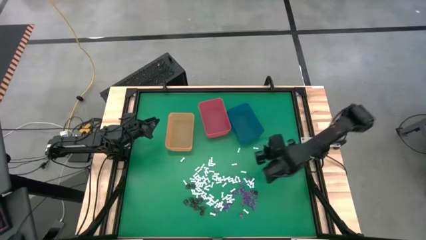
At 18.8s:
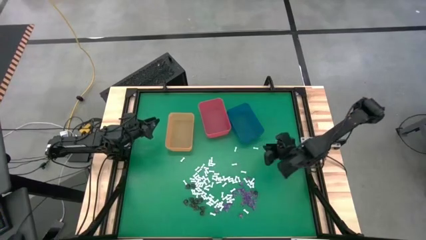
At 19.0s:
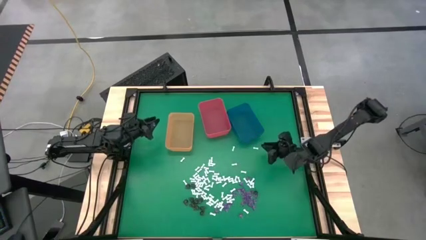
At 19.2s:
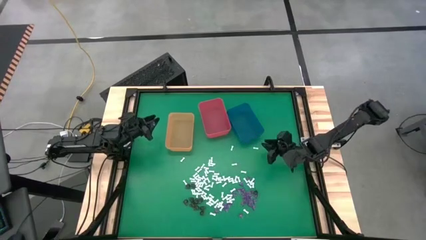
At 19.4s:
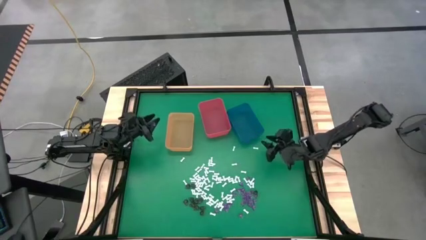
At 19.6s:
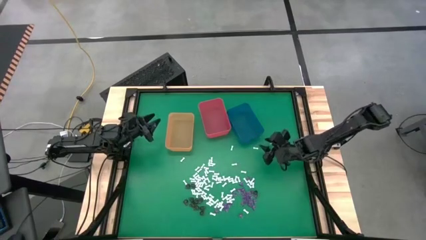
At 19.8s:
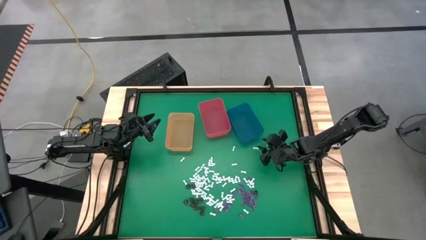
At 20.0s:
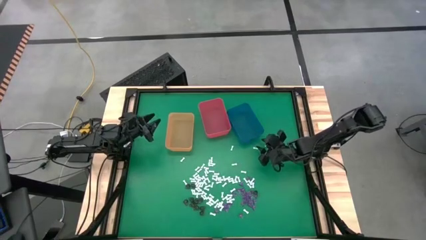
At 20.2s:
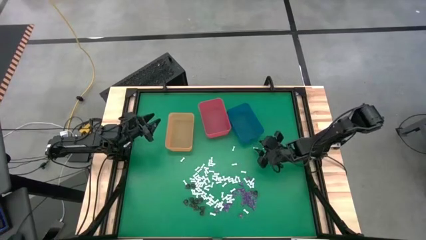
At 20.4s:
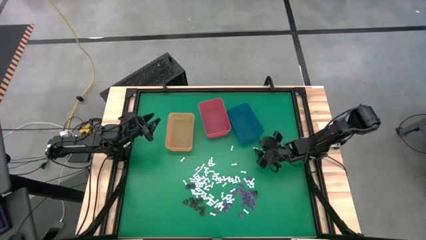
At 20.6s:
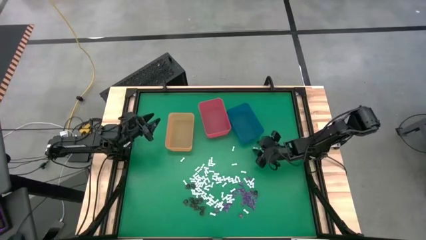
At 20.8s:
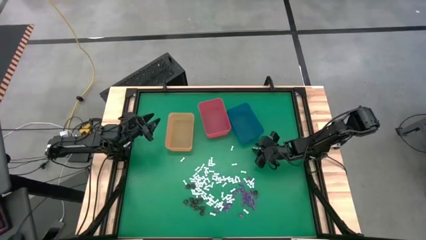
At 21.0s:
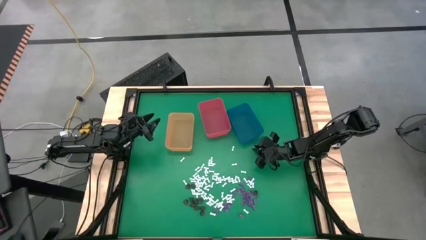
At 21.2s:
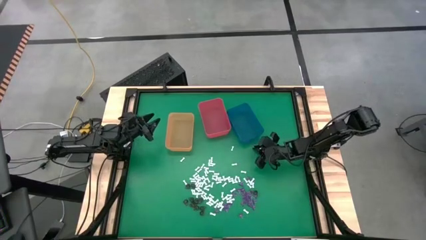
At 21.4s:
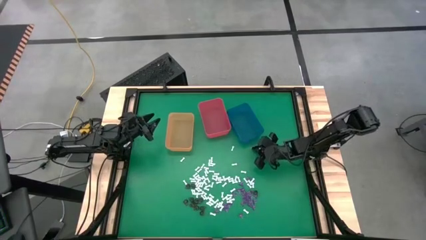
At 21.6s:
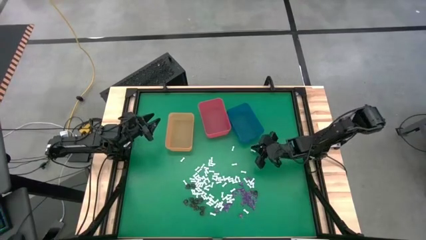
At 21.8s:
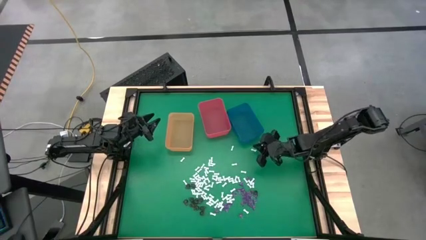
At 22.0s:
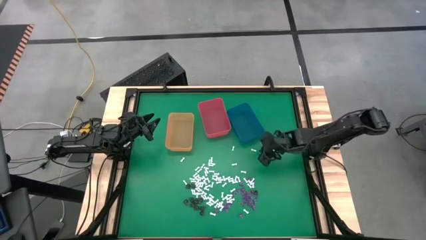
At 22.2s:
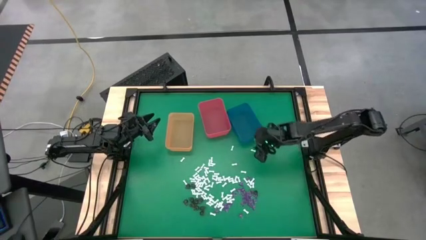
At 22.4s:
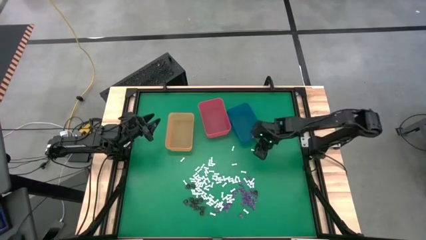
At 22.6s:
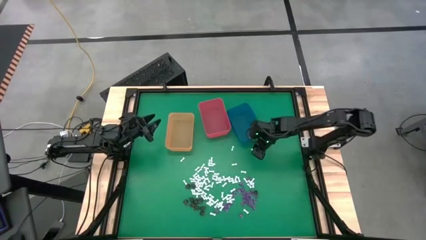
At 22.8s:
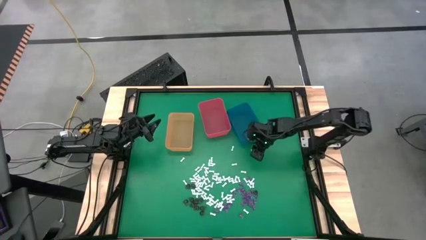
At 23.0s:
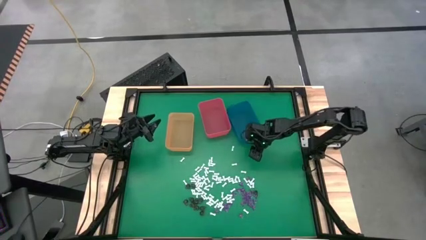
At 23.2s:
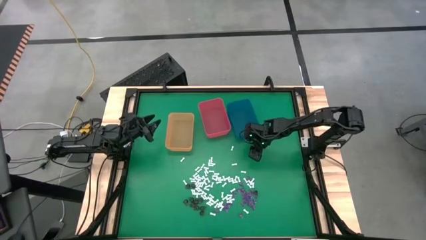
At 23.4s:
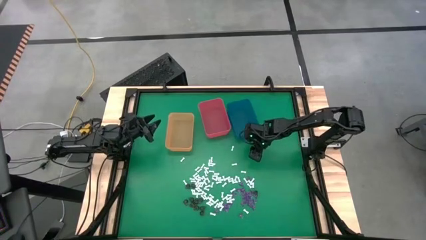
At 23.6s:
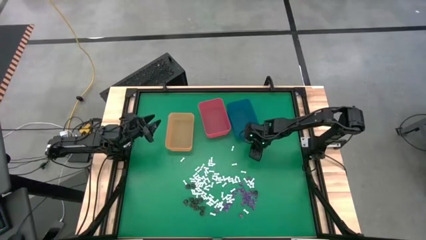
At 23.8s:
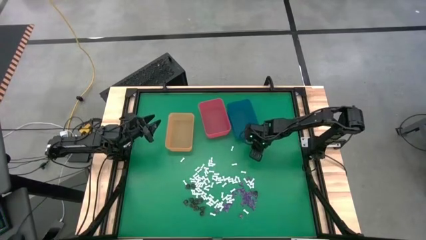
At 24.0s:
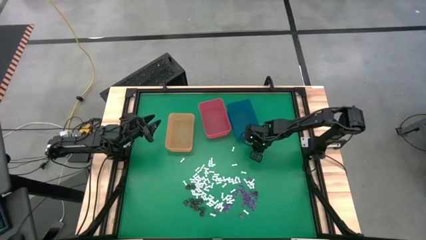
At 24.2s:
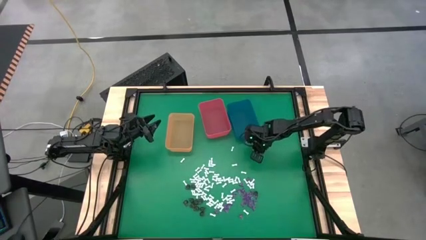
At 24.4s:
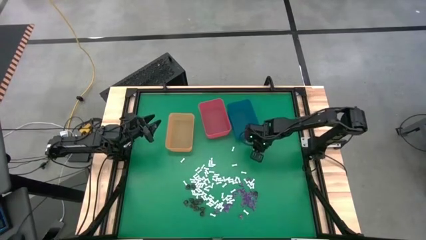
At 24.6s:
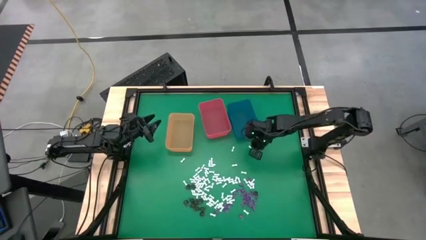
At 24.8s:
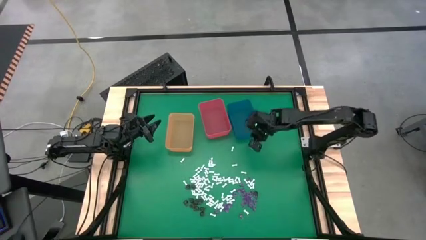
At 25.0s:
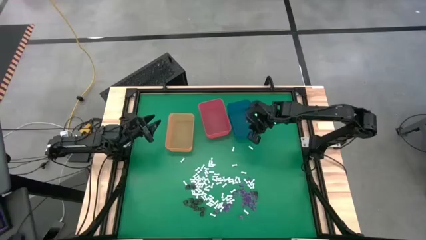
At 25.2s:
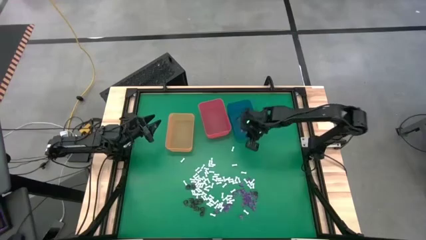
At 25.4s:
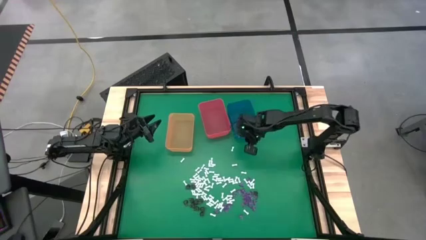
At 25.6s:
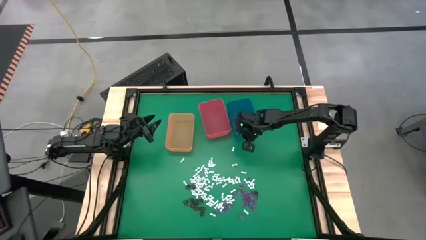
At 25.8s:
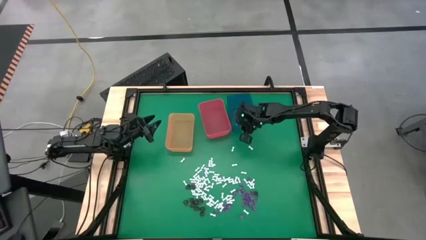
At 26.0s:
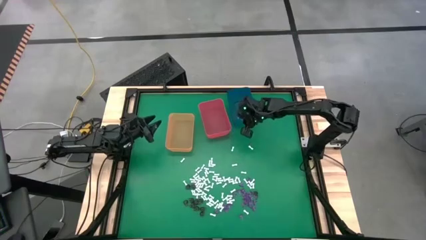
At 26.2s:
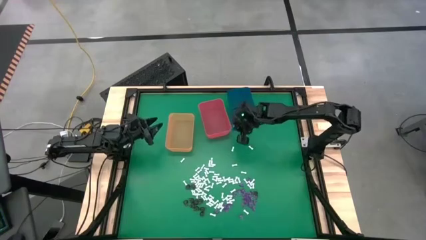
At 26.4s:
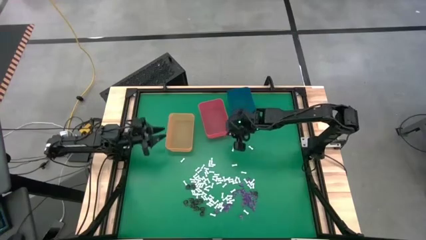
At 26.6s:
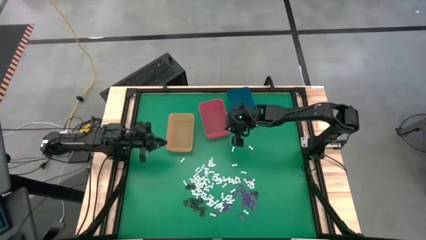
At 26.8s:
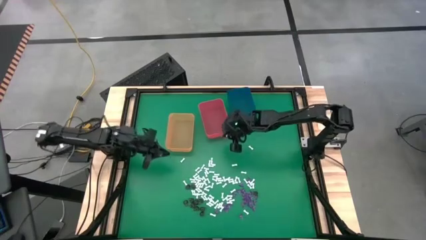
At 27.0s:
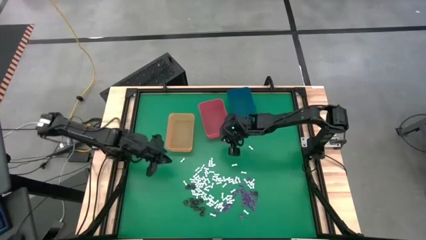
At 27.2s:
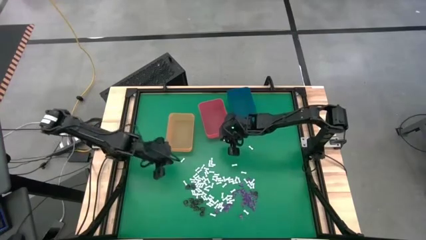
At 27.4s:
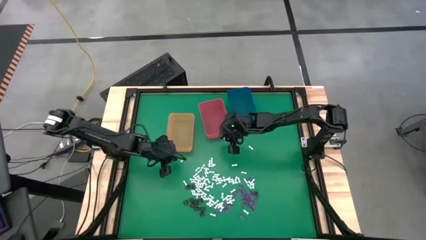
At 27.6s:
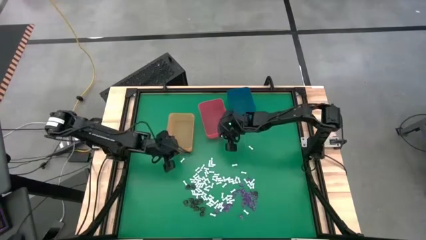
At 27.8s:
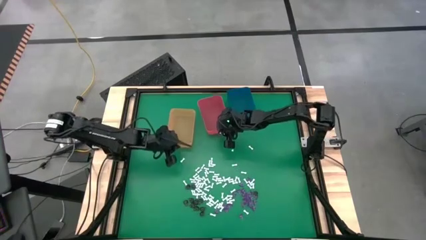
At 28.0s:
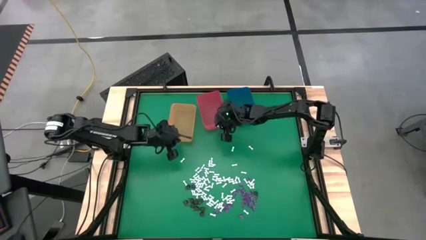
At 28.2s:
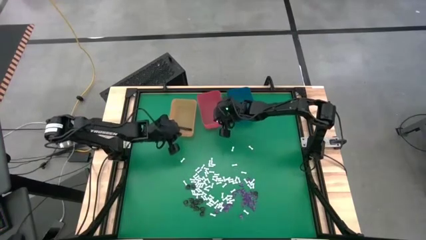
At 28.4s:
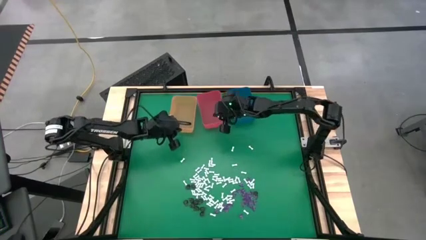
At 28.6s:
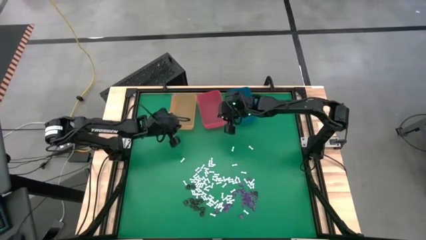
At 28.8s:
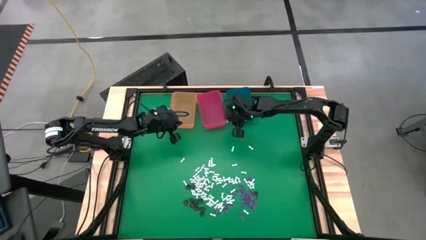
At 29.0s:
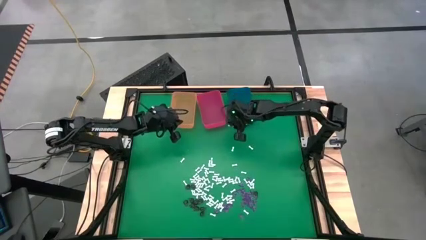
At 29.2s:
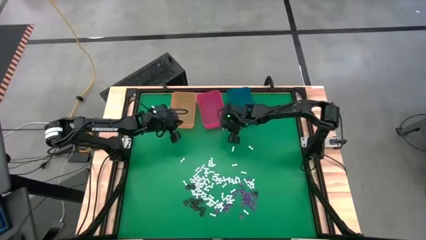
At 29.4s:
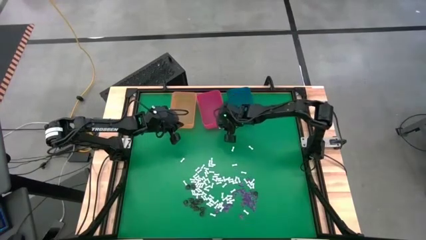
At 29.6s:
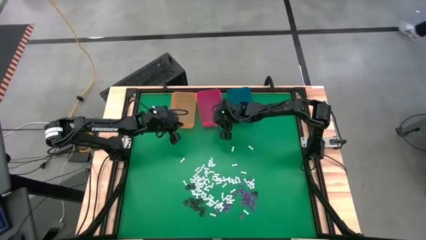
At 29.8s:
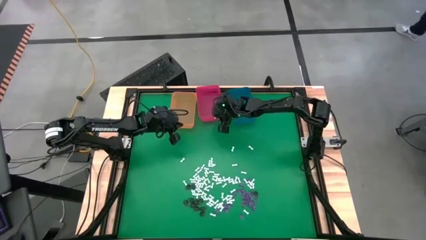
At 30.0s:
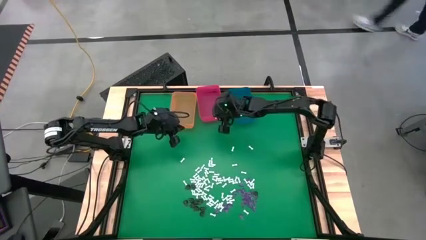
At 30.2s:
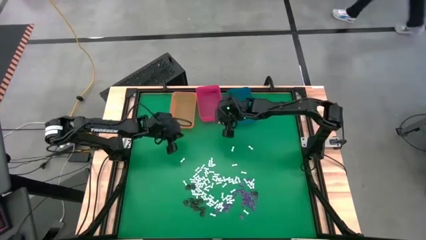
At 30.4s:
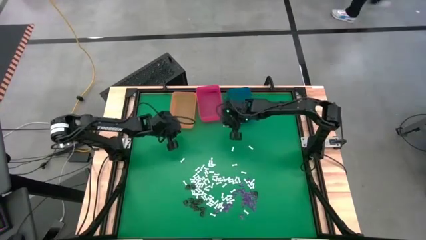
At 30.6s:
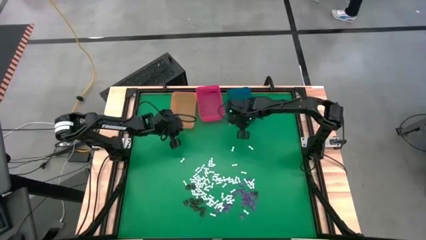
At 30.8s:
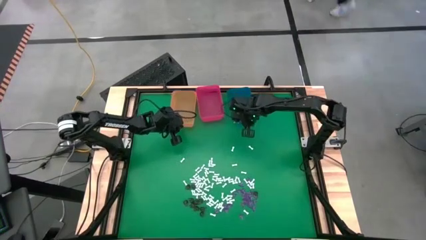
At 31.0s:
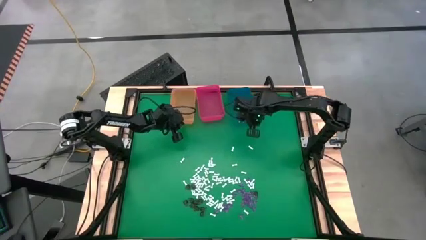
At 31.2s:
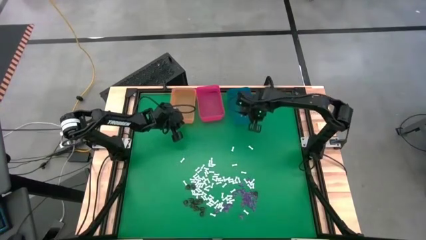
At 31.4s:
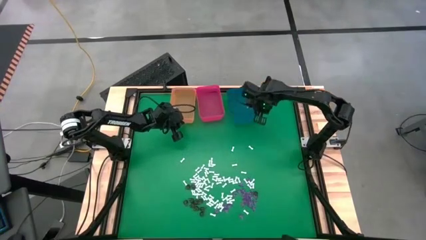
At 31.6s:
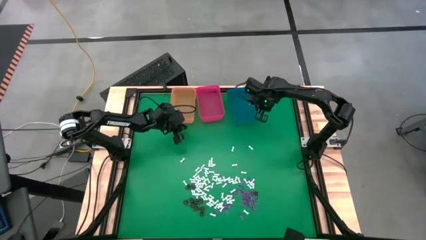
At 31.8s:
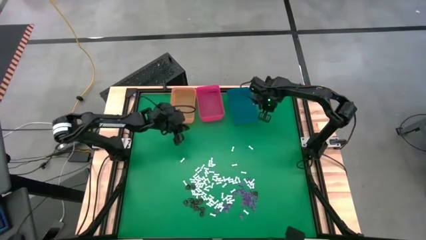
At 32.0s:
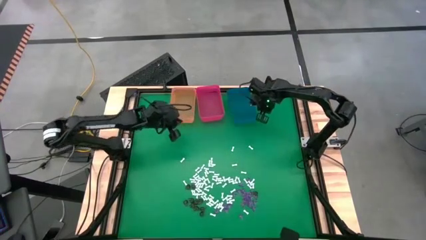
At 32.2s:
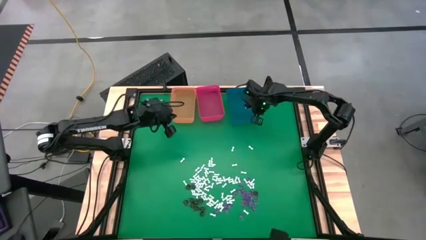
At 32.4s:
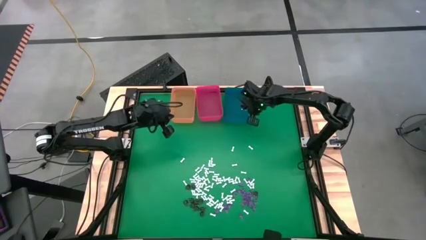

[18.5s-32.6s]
Task: Sort Halloween decoration
Put the white bone toy into the blue bin

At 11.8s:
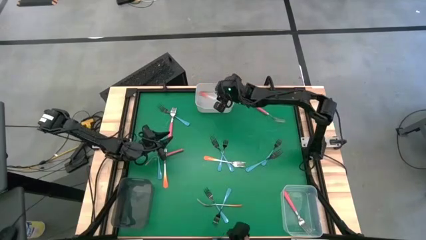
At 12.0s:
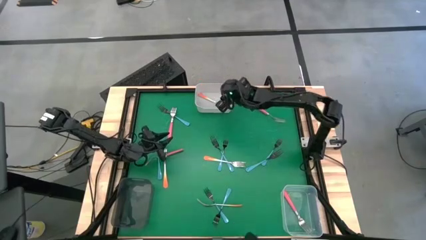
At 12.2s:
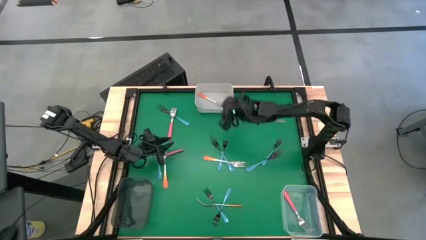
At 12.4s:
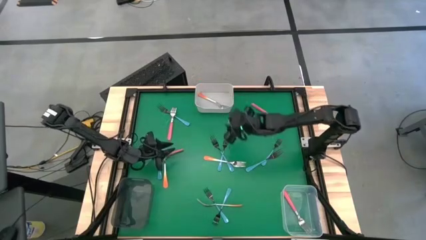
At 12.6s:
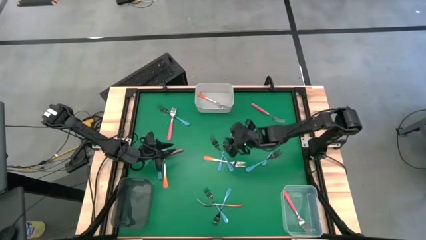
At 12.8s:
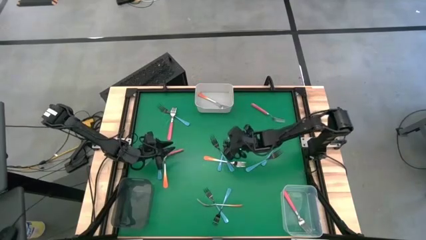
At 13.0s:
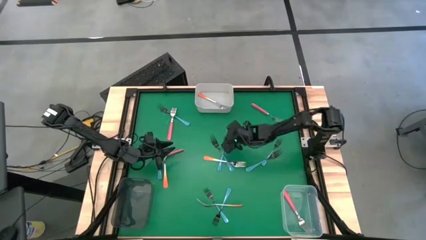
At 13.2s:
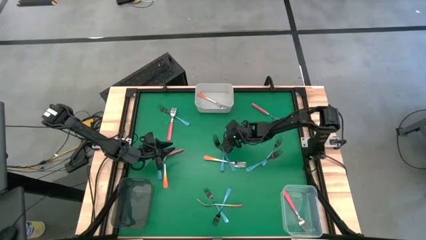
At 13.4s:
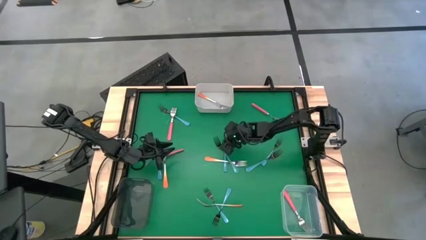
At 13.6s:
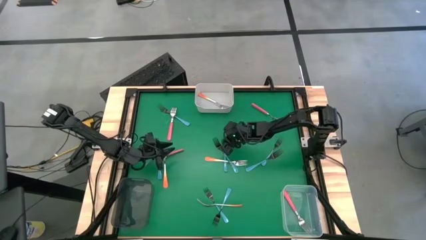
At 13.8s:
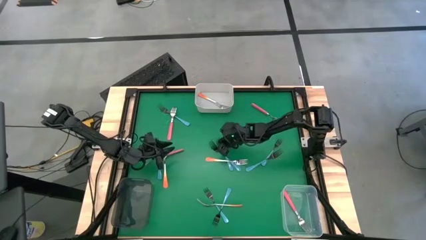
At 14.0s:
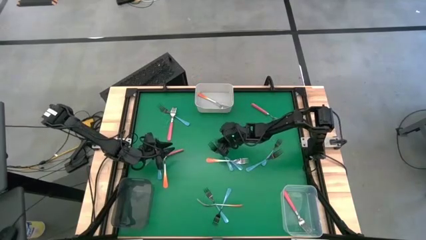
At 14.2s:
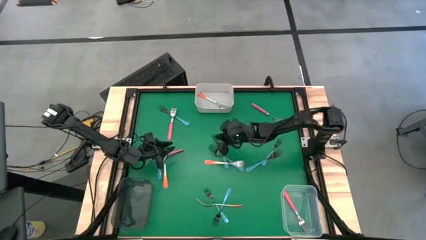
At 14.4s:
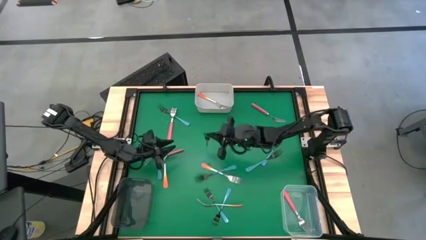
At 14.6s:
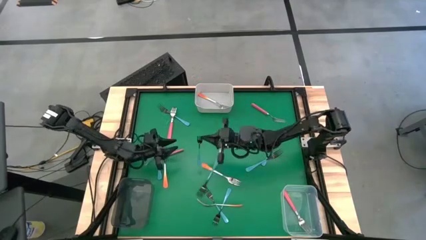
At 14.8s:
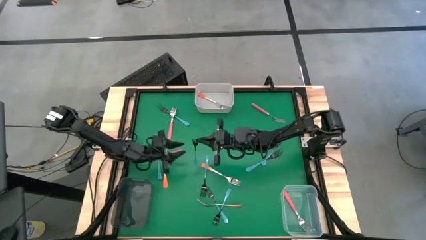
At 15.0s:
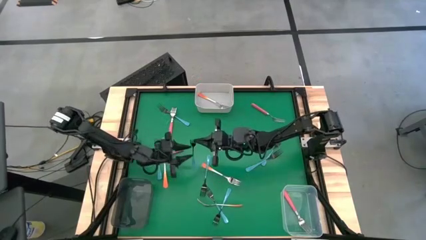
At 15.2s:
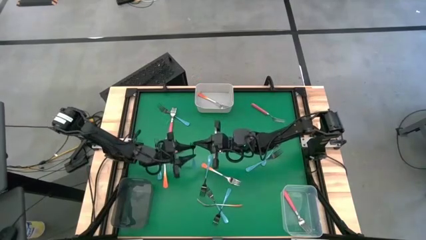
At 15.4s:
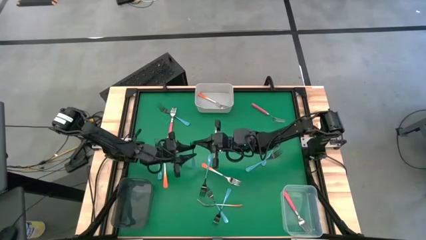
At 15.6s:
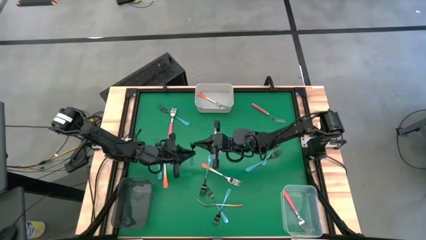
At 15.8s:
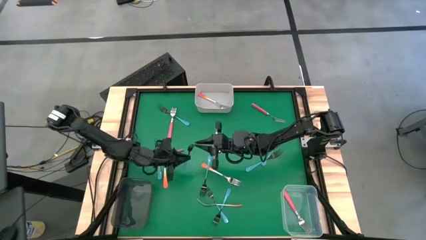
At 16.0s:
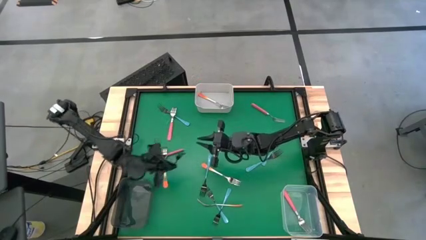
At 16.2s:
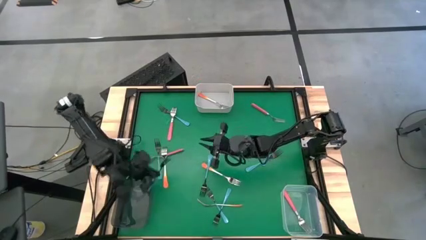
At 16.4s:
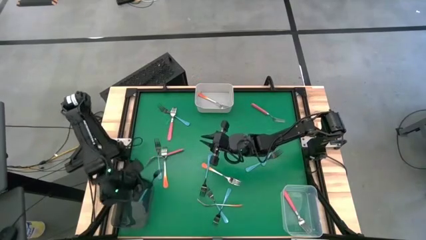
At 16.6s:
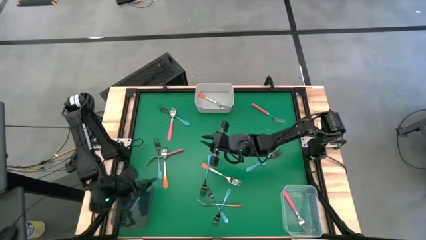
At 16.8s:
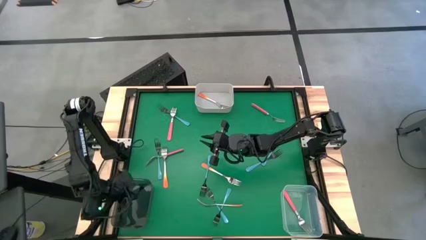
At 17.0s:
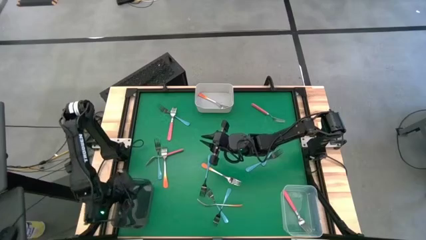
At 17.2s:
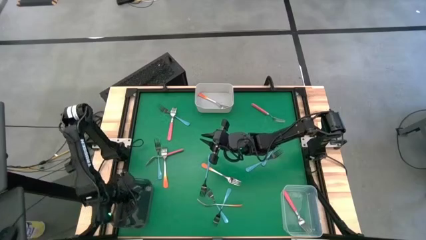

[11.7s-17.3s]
Task: Sort silverware by color (type)
Put the blue fork into the black transparent bin
